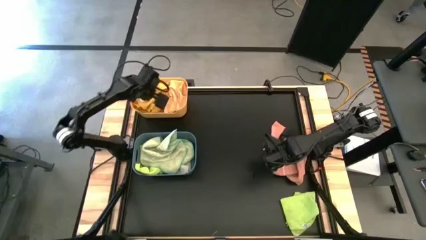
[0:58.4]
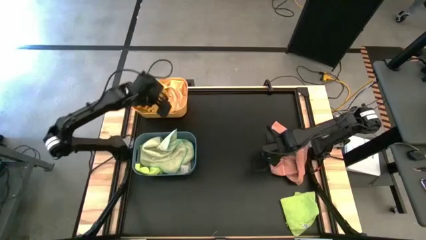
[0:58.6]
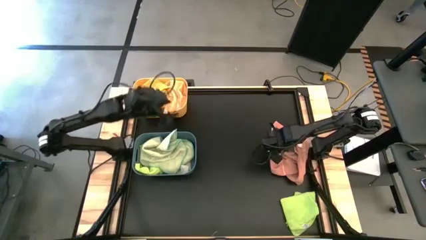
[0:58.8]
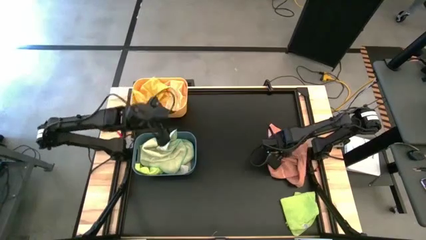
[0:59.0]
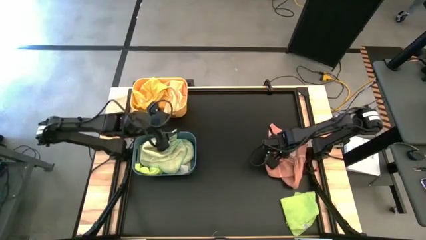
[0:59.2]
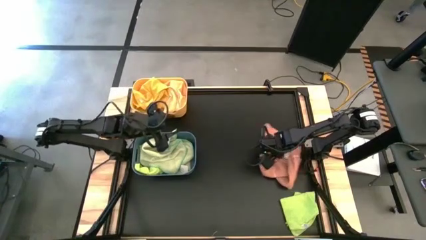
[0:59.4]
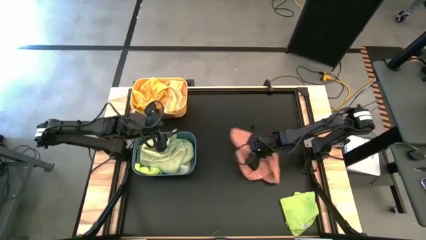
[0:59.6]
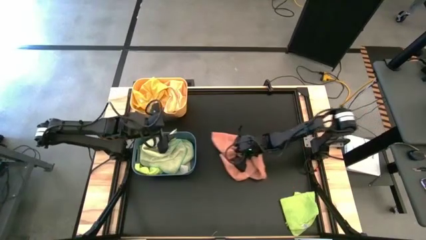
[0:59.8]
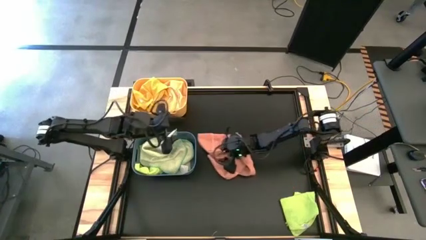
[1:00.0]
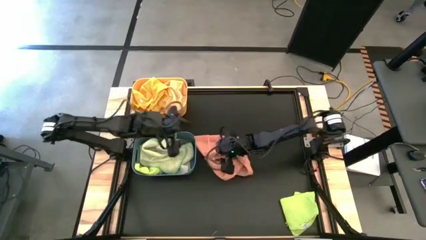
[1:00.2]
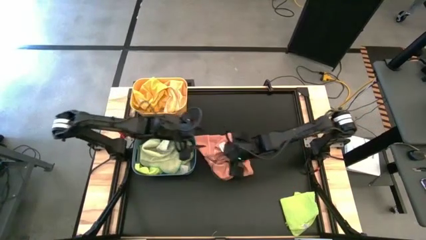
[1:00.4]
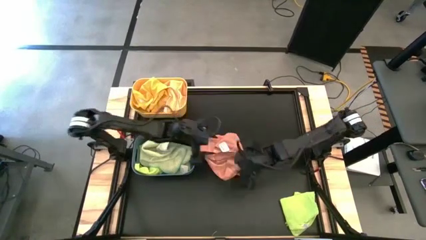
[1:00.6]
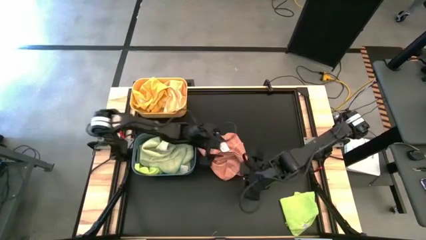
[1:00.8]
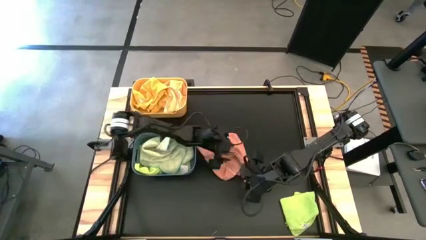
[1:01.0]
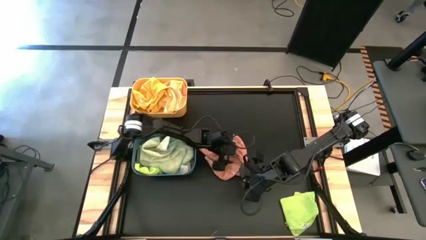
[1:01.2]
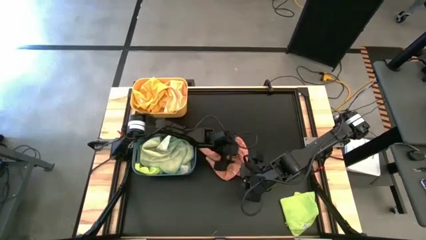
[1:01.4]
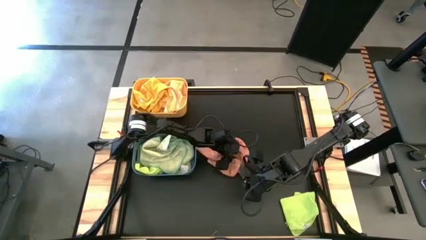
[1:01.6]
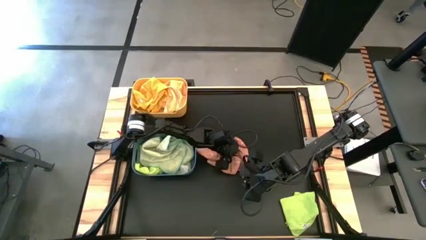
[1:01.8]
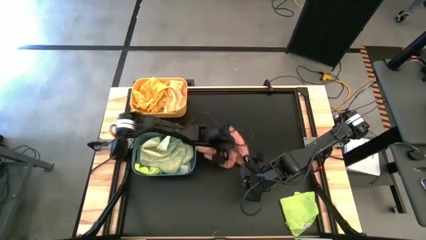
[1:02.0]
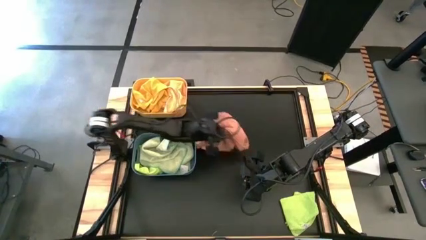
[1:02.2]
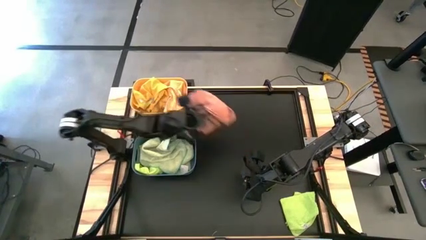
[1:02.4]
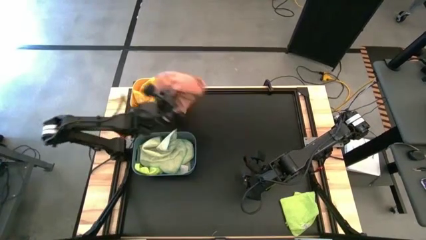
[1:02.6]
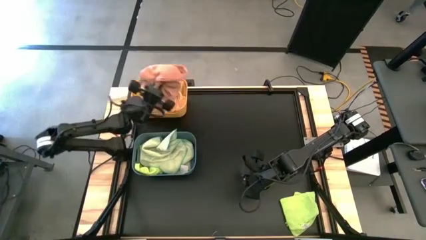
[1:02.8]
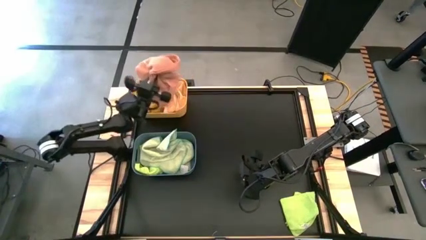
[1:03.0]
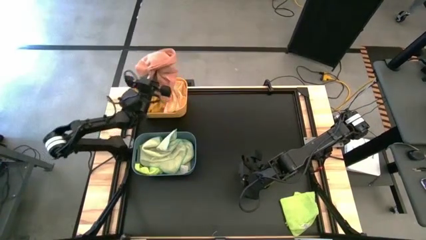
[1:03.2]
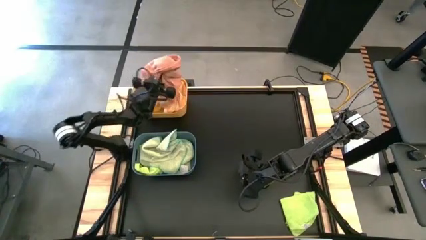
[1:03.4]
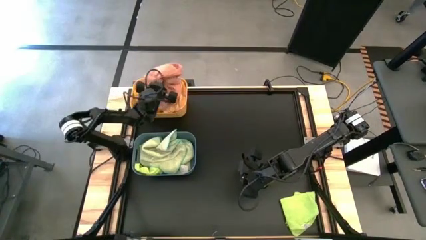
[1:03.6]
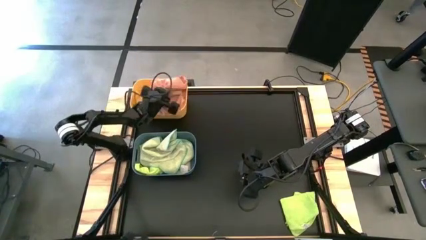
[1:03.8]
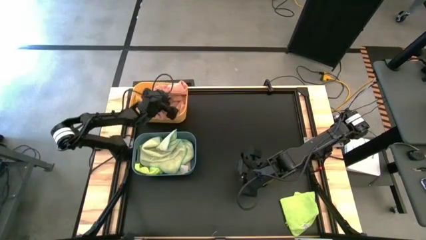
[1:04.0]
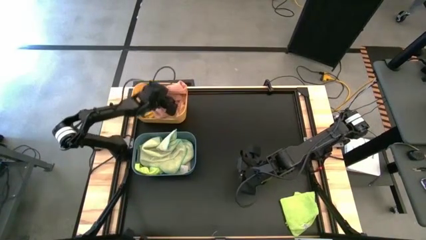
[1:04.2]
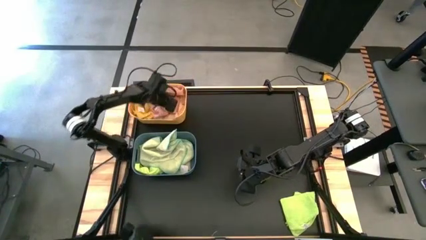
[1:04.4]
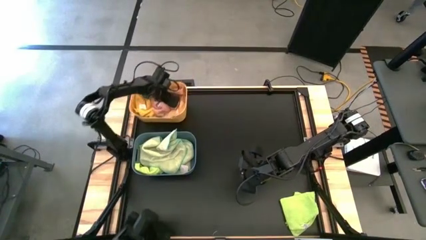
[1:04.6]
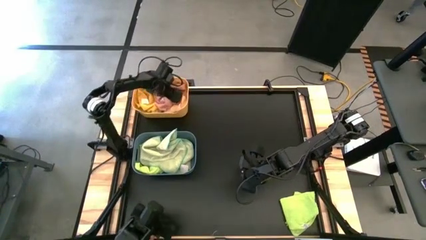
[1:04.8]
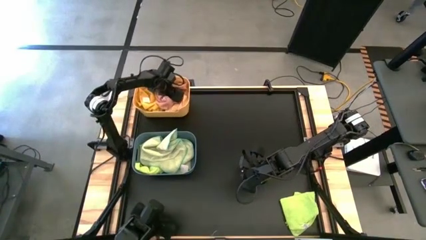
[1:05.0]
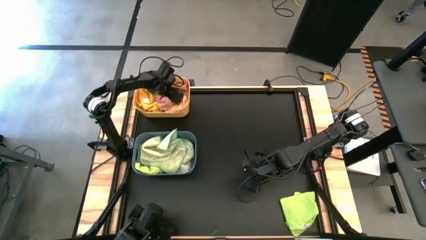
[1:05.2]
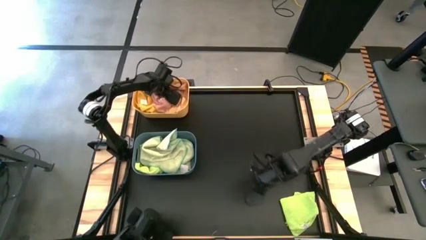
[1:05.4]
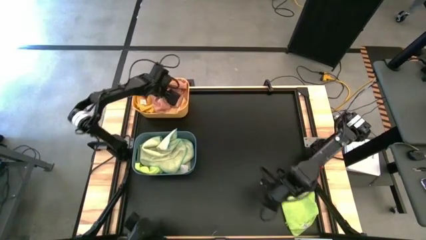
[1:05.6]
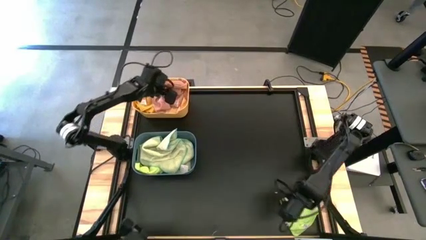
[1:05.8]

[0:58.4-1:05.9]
Task: Sort microfiber towel by color & place in baskets
Put the pink towel into the yellow bin

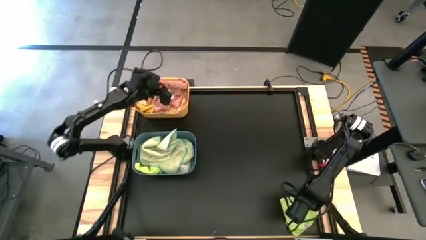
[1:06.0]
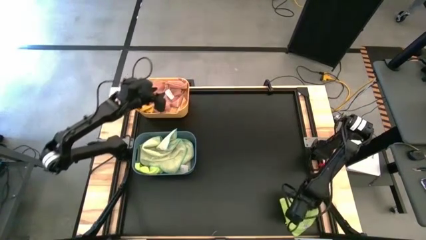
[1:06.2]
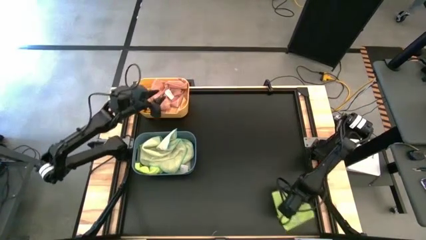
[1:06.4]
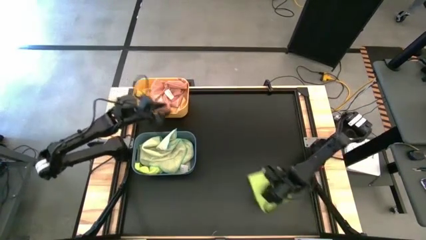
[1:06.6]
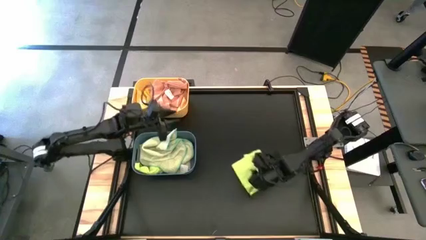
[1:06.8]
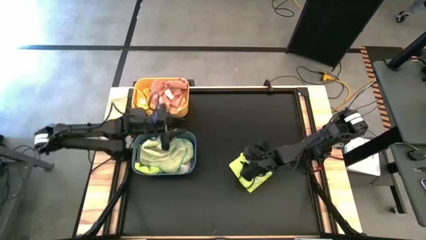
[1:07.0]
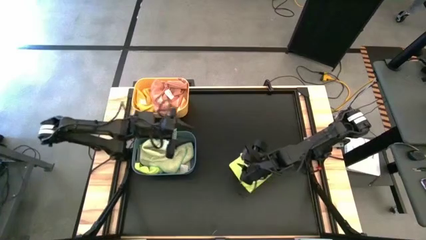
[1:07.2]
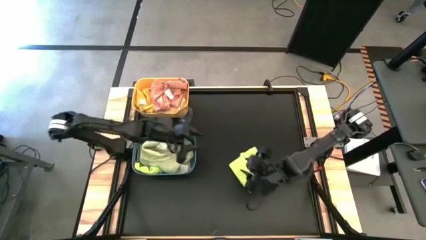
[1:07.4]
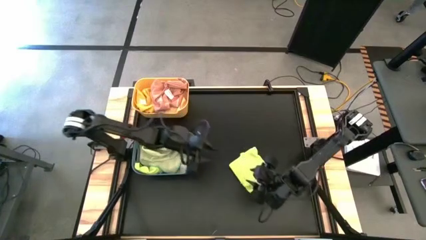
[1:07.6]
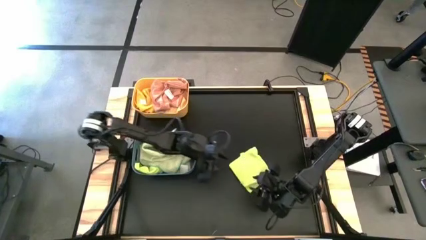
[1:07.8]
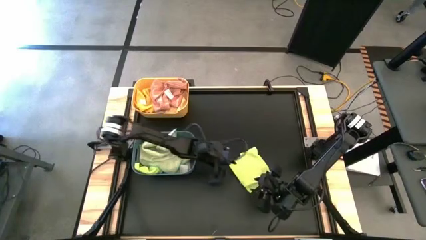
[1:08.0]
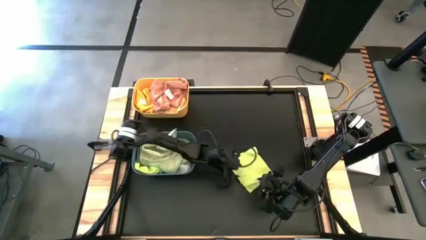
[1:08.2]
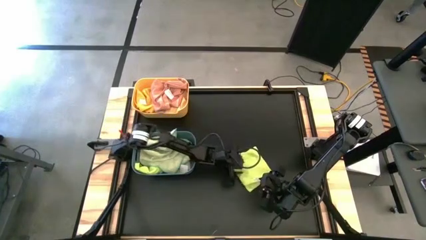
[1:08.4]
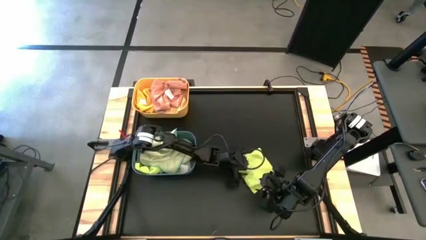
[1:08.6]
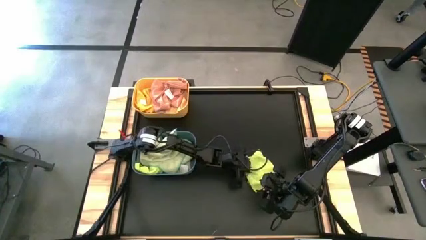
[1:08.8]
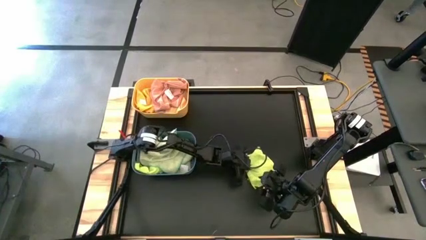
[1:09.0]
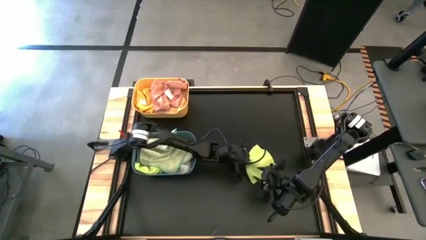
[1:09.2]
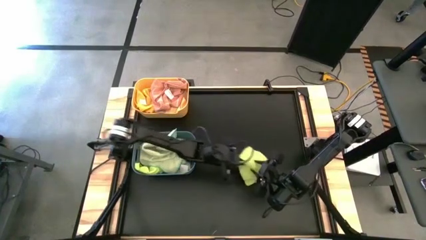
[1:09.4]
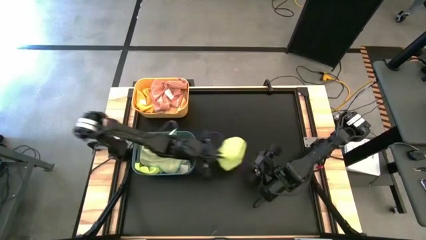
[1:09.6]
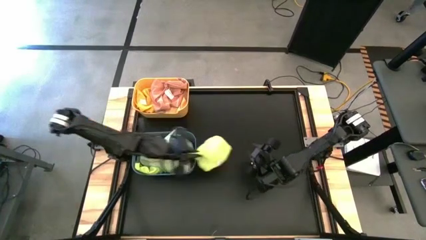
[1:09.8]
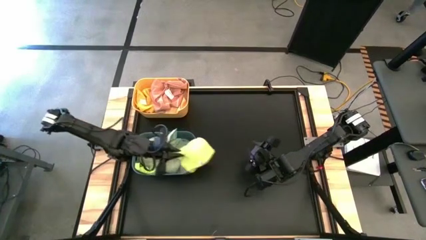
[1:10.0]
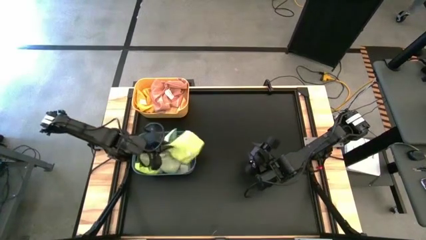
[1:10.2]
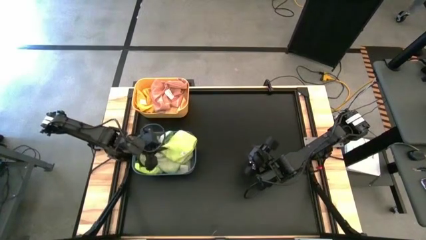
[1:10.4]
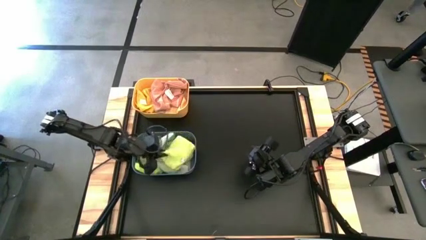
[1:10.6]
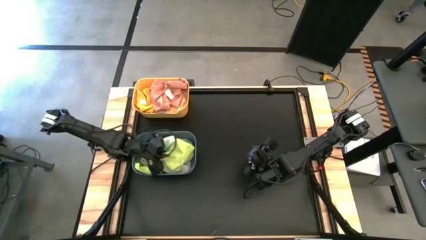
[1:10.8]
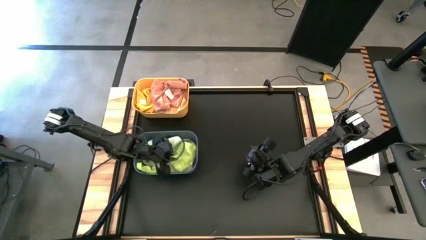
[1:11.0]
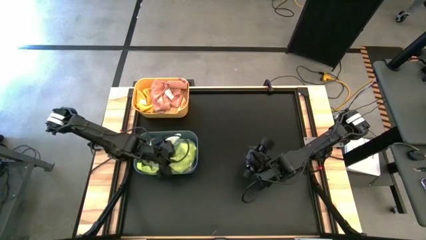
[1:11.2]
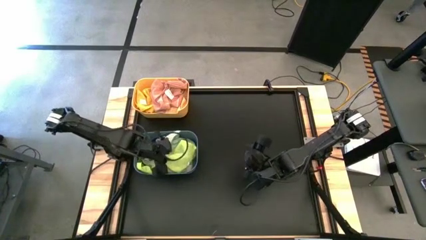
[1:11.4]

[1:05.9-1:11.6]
Put the green microfiber towel into the blue bin

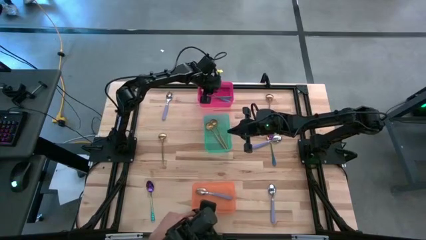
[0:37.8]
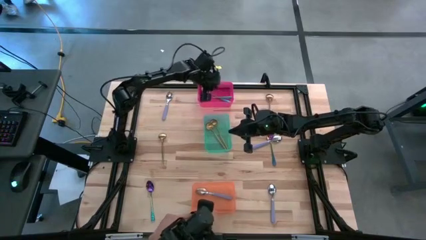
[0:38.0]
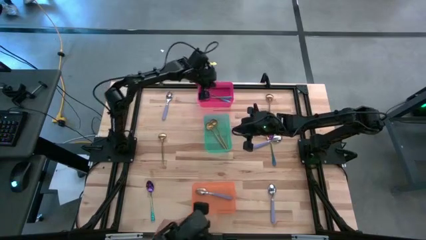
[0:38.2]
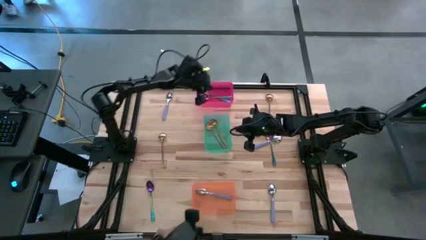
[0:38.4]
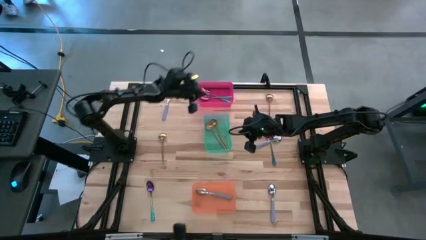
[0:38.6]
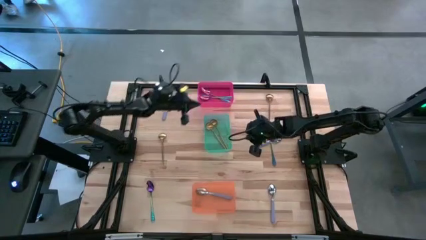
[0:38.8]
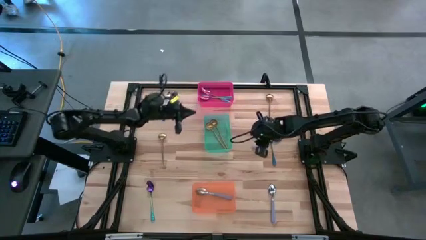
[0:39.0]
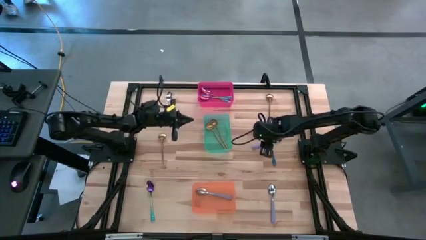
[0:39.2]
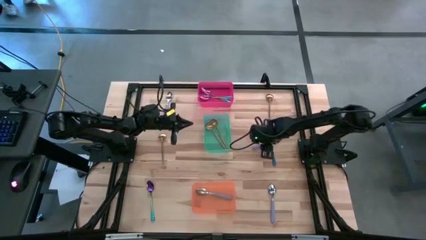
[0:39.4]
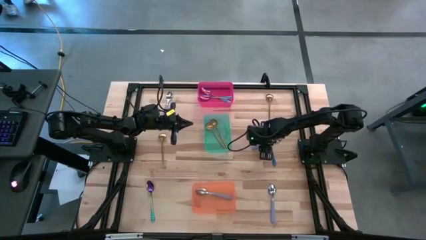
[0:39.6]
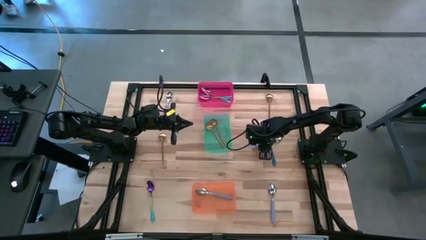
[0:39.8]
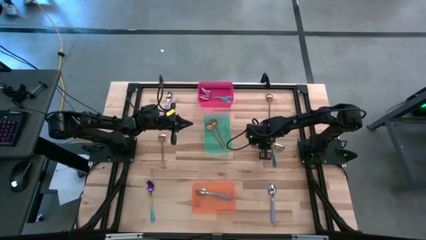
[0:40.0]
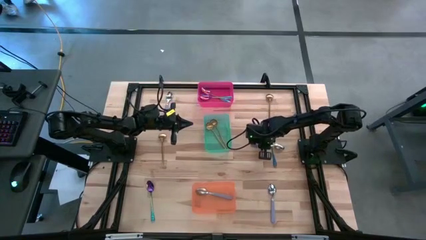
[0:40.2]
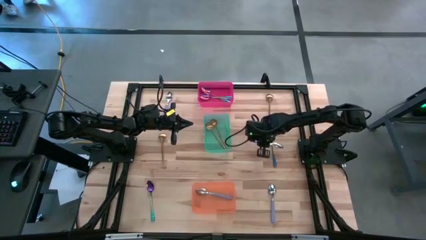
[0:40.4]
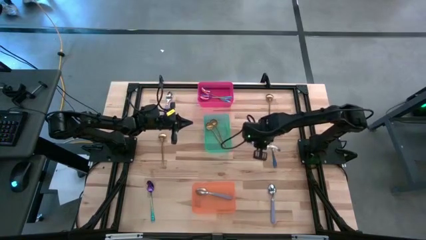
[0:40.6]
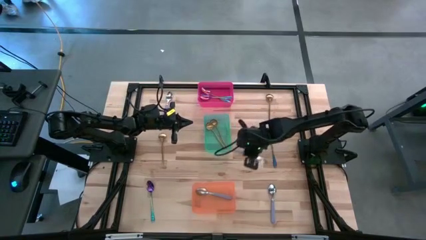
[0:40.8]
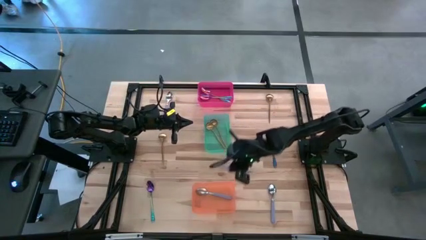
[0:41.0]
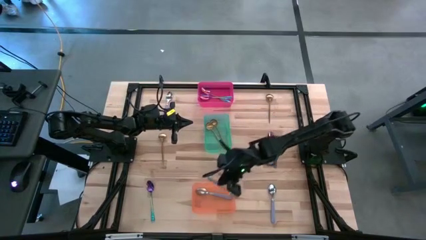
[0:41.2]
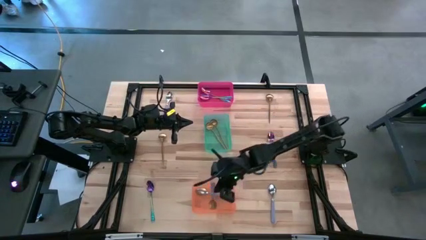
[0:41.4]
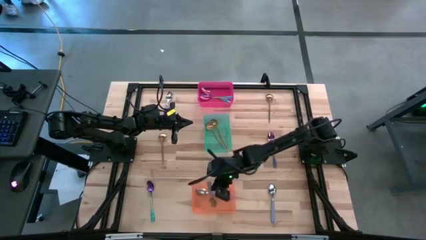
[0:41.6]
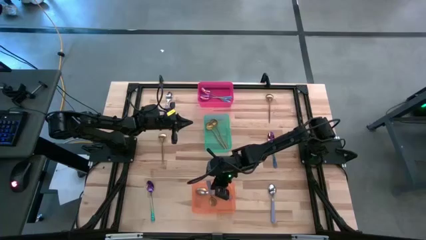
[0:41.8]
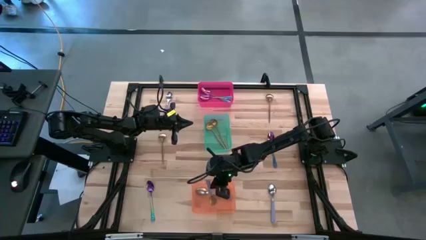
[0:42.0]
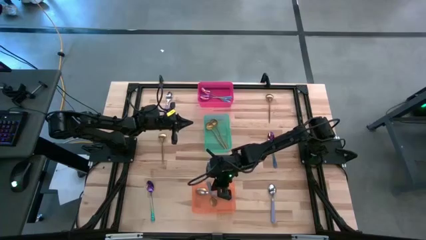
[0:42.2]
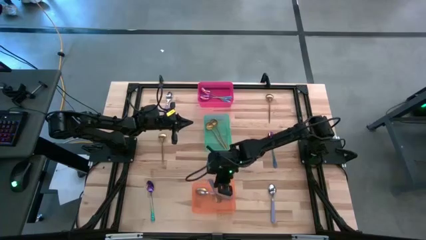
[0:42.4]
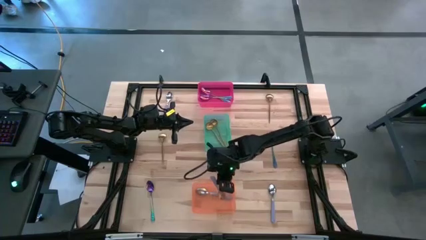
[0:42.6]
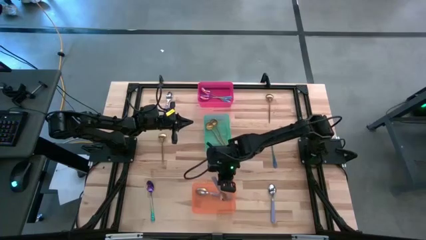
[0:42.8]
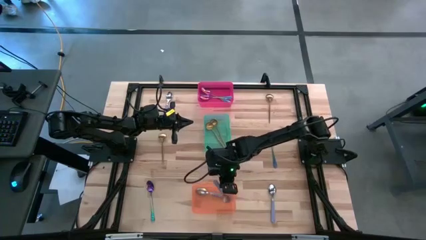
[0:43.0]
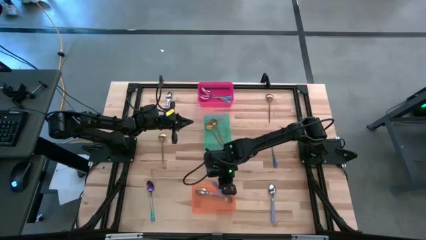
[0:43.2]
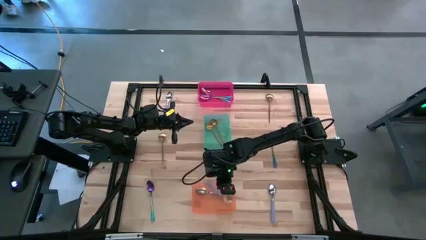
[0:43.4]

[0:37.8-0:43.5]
Task: Sort silverware by color (type)
Put the purple spoon into the orange bin
